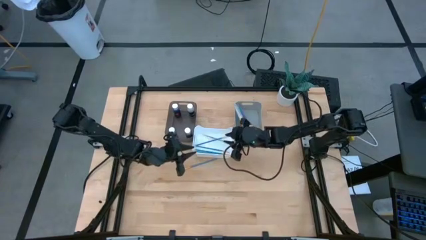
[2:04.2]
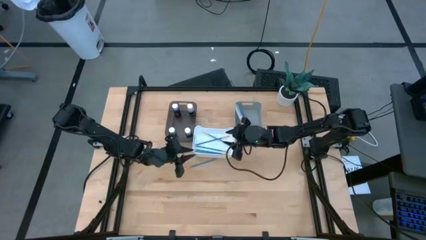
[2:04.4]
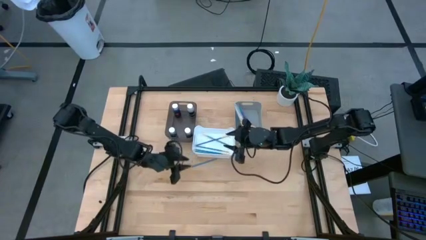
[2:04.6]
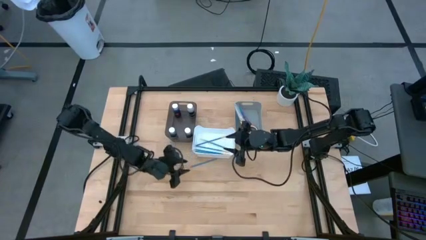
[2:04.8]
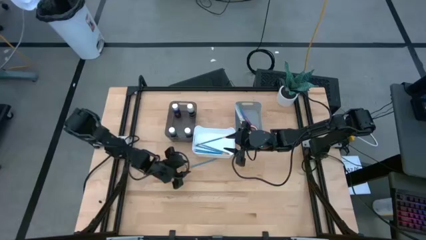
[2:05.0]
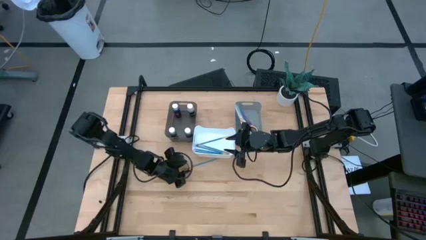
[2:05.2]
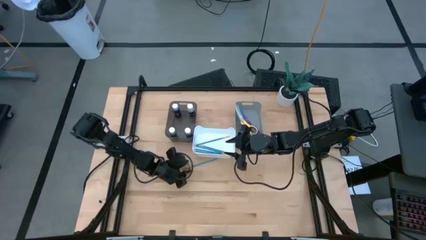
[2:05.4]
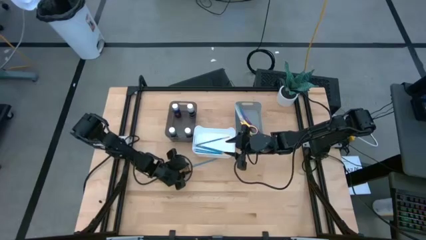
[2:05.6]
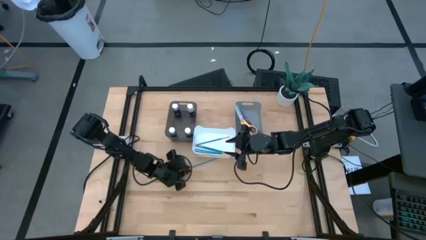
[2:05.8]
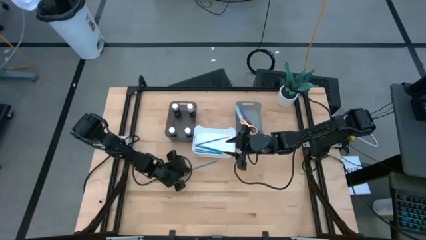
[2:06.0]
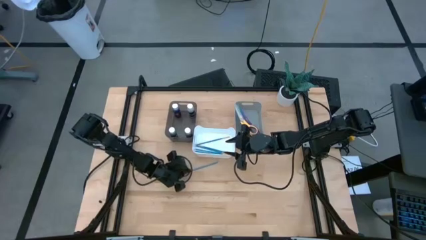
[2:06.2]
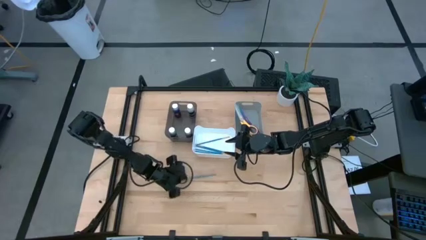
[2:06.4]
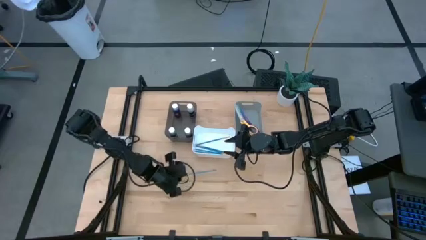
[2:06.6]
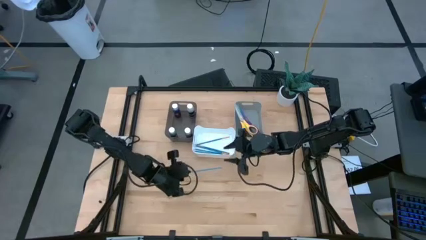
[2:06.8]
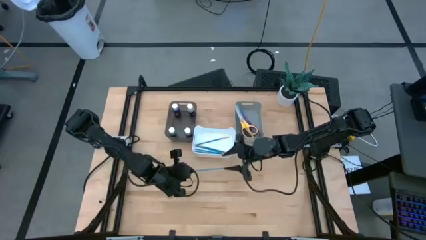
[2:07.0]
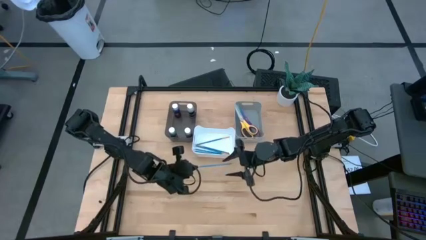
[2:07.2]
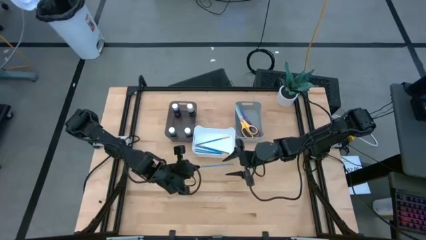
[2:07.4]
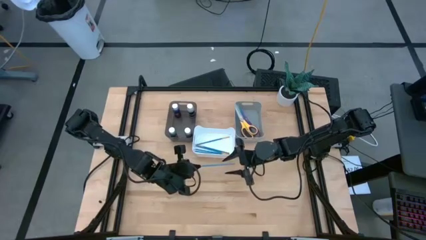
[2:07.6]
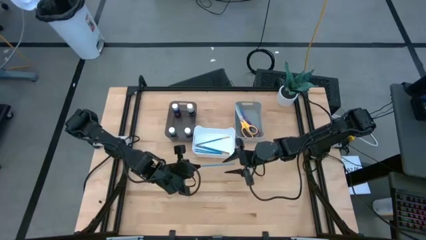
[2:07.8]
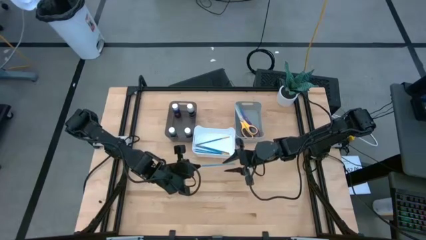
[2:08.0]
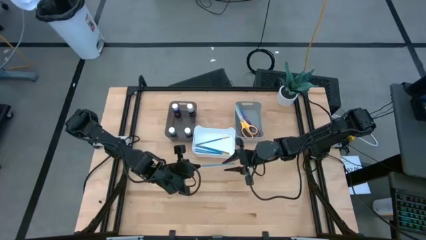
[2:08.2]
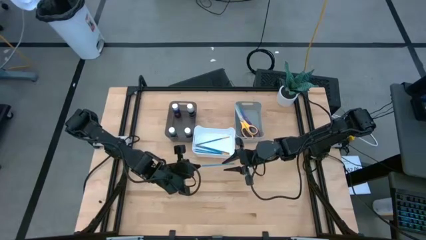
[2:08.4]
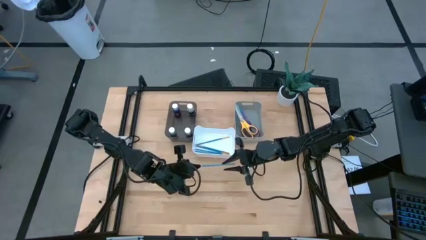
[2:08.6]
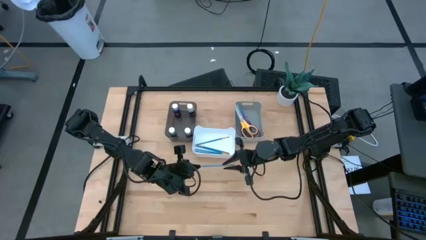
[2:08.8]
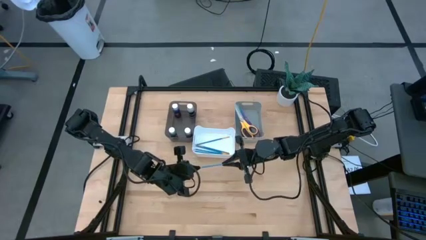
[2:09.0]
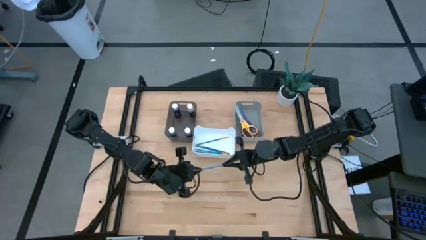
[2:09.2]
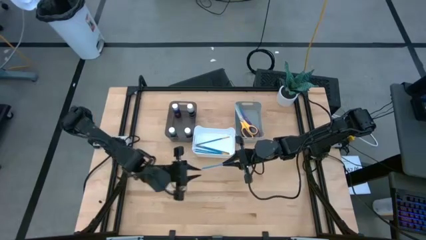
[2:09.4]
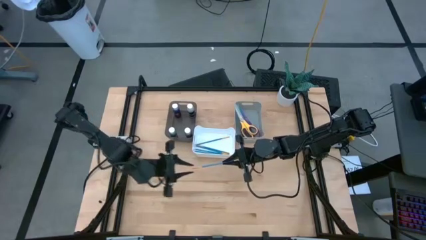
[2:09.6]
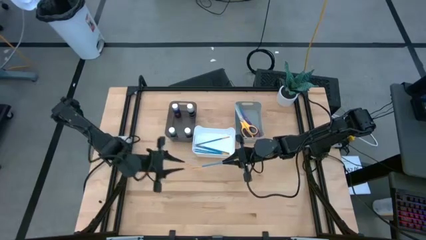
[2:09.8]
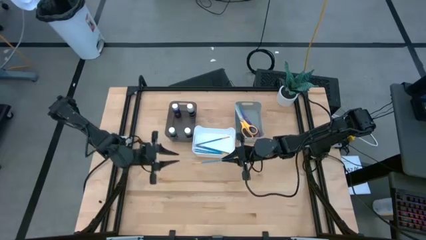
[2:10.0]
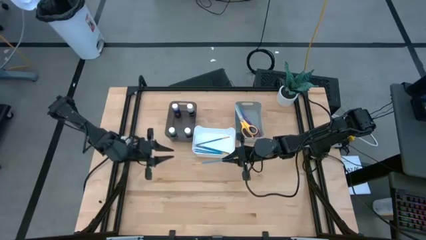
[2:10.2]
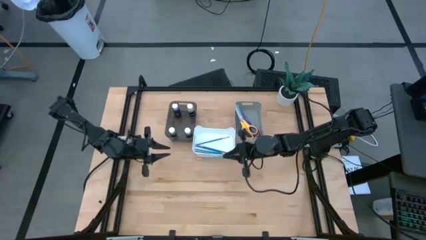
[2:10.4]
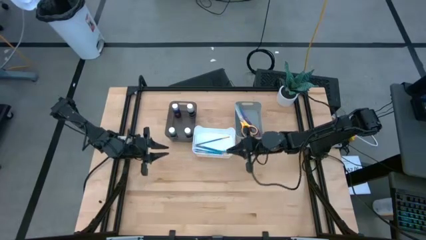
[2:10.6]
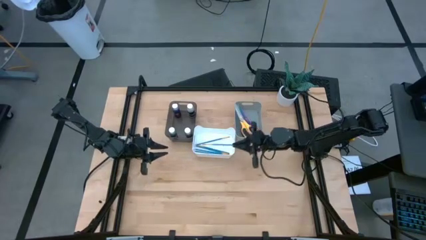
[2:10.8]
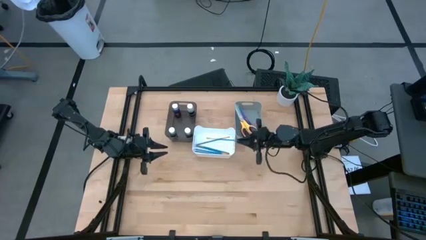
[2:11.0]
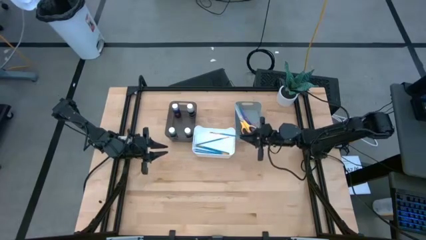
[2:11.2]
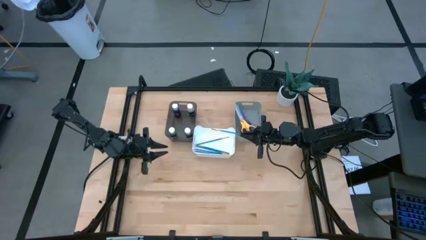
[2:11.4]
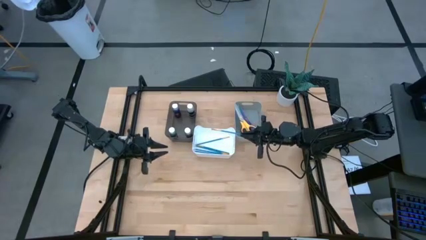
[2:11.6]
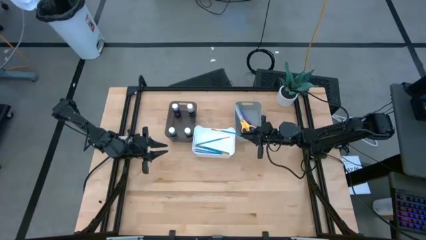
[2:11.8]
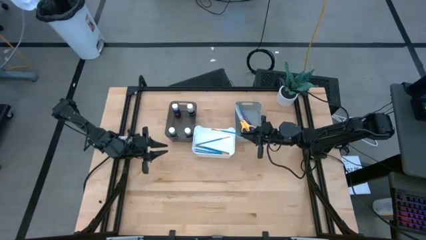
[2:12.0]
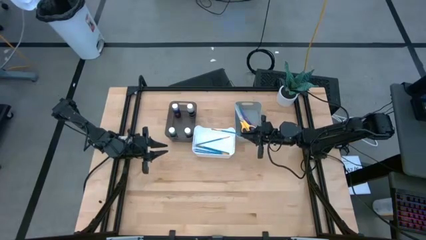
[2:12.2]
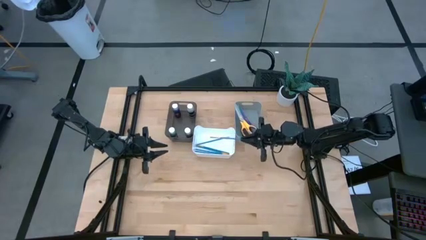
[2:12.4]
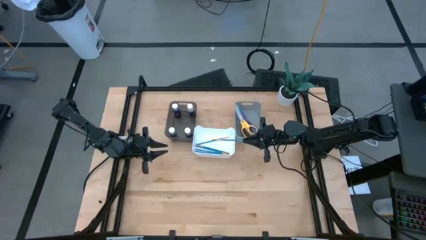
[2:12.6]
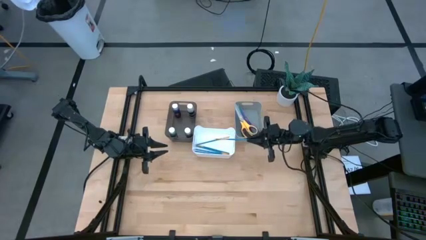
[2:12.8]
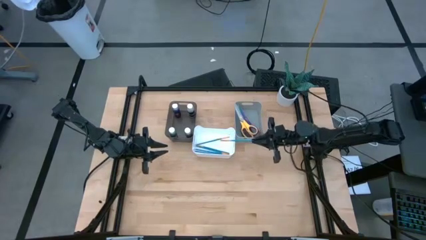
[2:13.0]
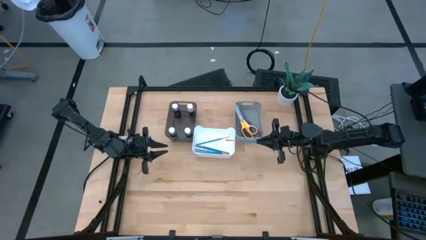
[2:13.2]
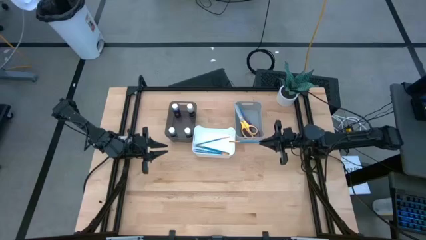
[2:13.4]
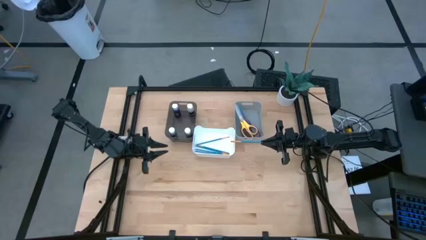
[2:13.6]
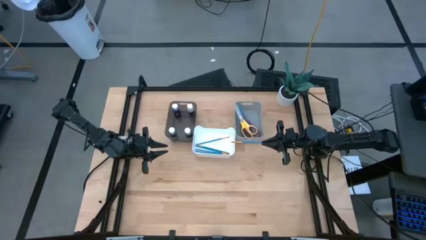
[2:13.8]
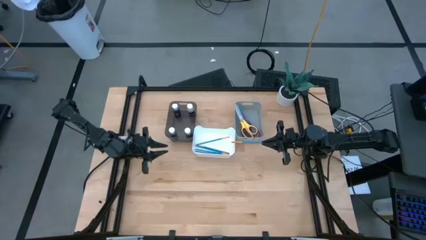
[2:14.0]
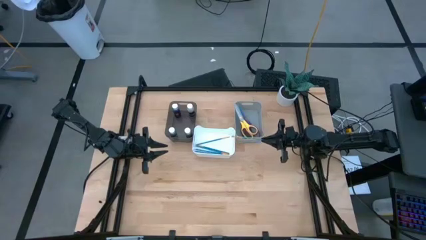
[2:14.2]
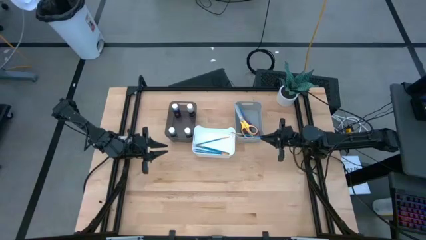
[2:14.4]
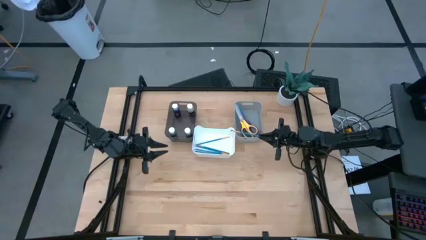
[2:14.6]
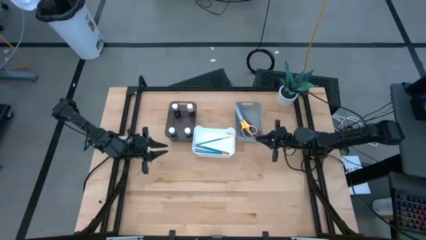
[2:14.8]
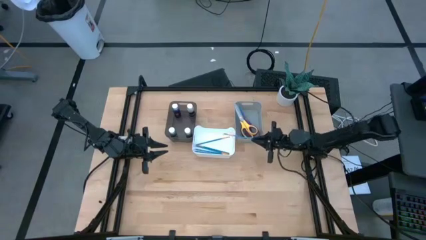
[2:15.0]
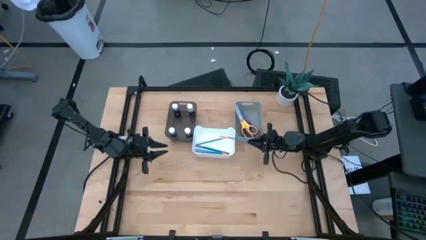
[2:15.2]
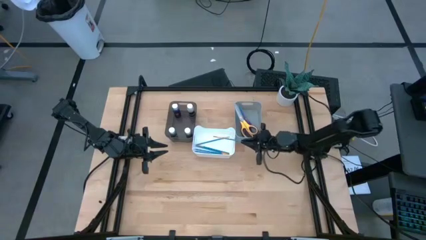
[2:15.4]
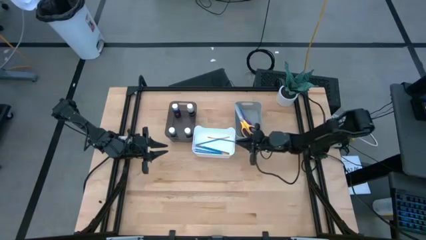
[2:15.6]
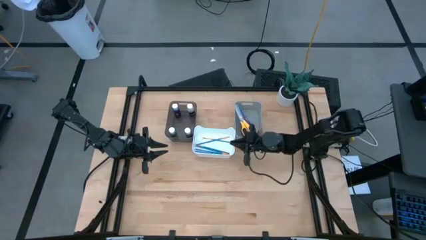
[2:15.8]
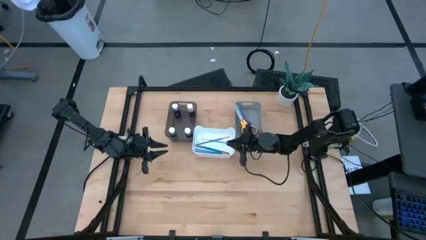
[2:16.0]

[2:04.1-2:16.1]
Task: Pick & Place Paint Supplies
Put the blue paint brush into the white bin

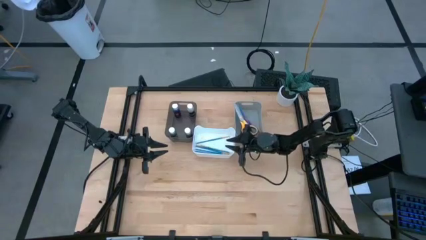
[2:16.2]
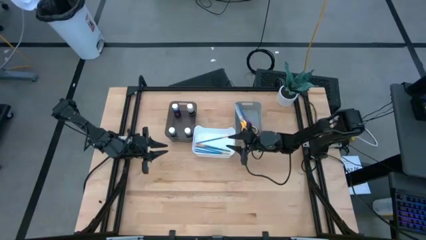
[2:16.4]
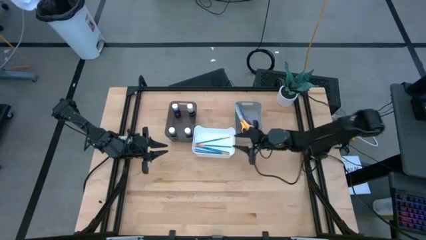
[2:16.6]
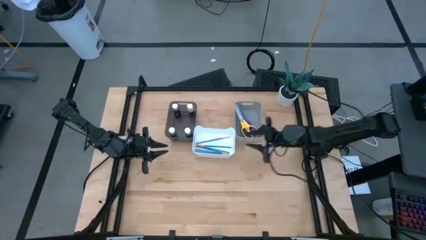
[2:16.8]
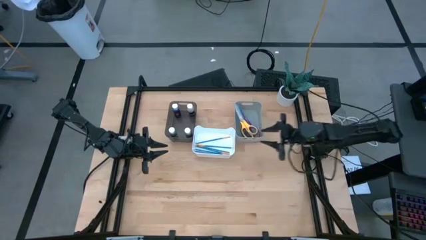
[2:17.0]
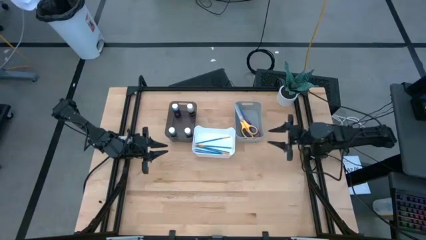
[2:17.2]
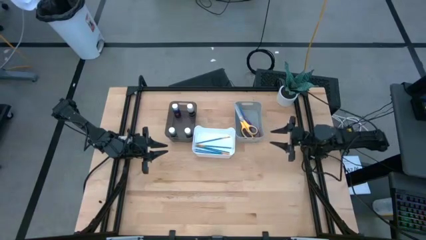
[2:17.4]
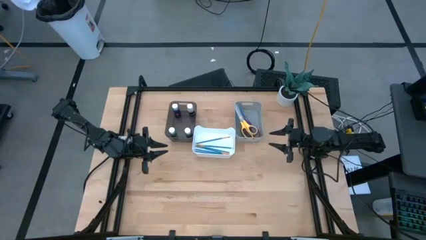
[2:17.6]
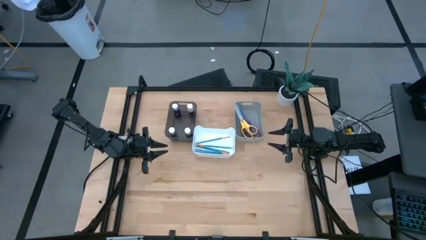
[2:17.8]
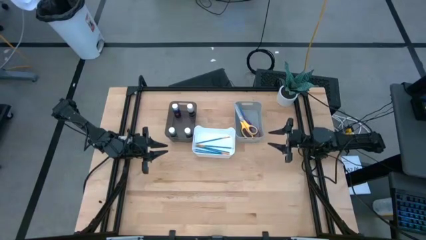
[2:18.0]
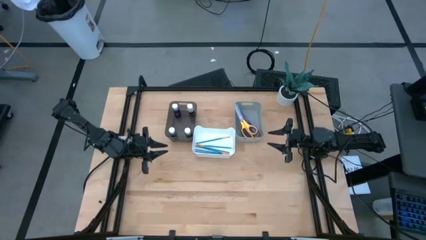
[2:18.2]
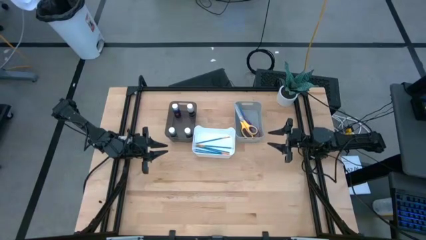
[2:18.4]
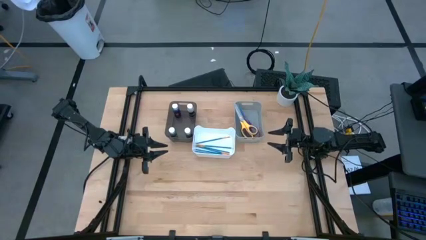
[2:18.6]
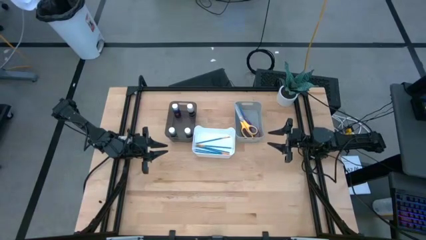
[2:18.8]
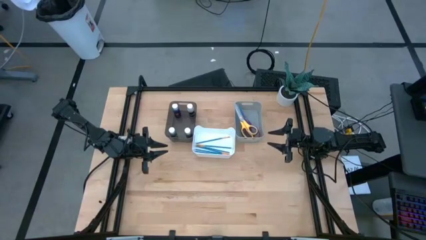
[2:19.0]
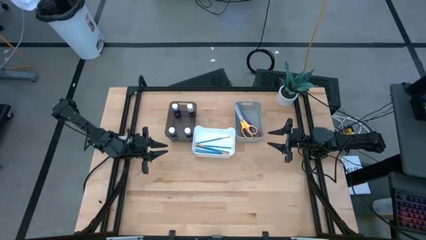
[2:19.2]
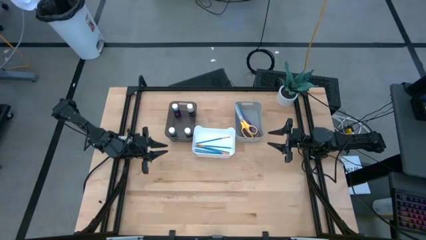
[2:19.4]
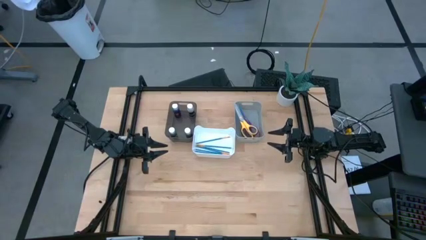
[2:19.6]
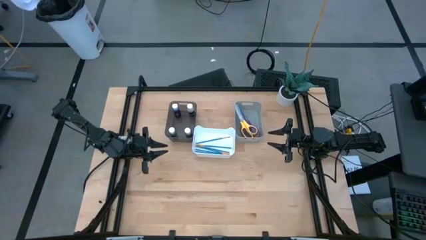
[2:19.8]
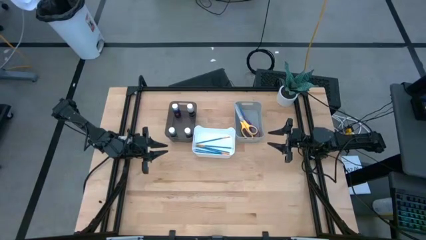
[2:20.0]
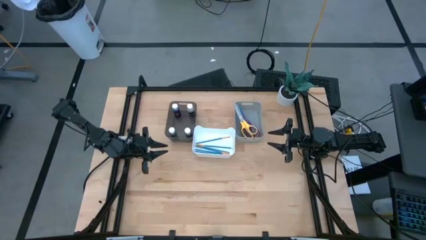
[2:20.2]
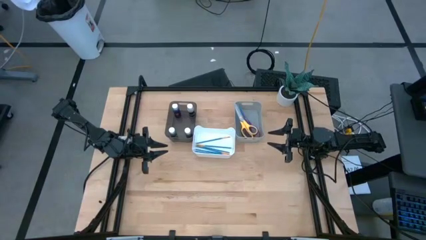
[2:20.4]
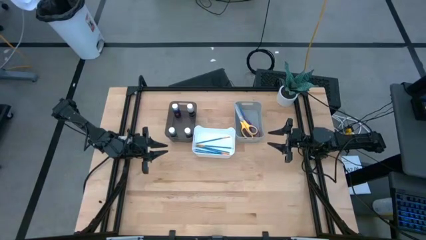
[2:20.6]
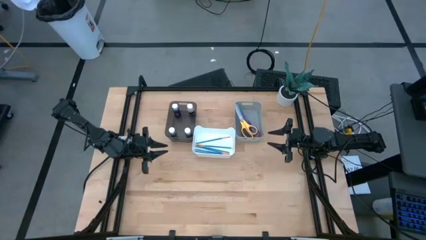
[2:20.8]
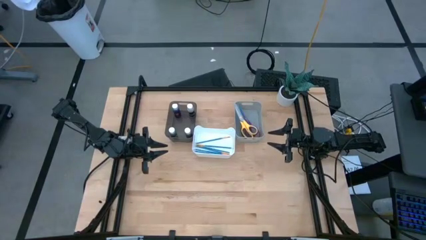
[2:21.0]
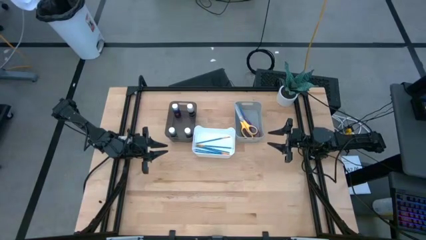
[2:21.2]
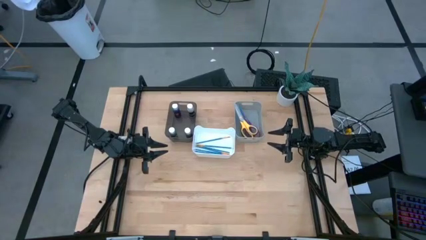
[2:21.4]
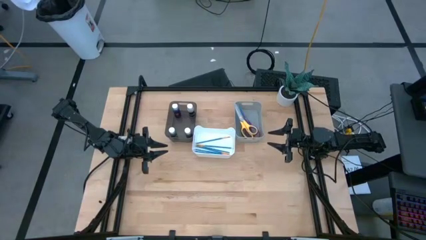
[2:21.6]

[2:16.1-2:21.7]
Return to Home Position
